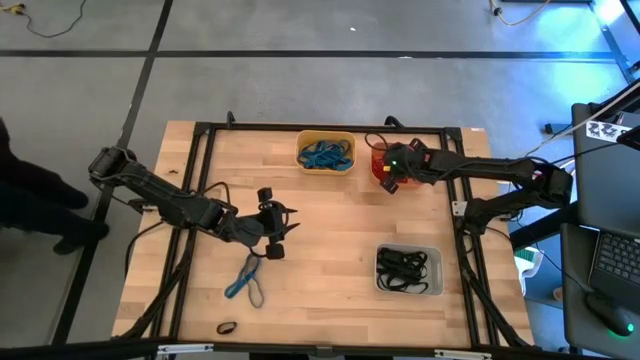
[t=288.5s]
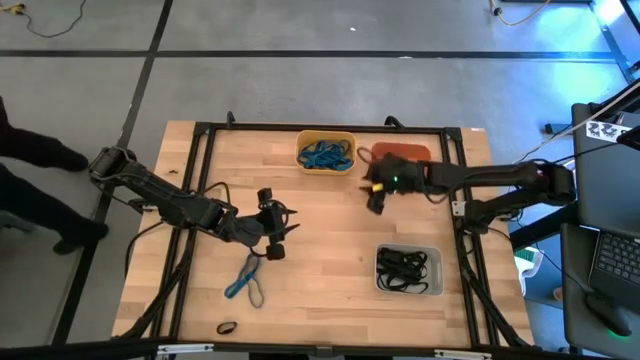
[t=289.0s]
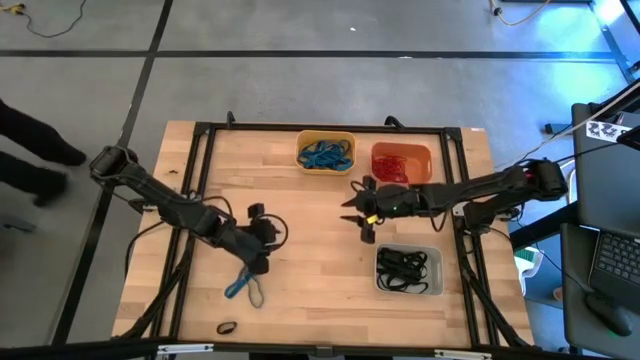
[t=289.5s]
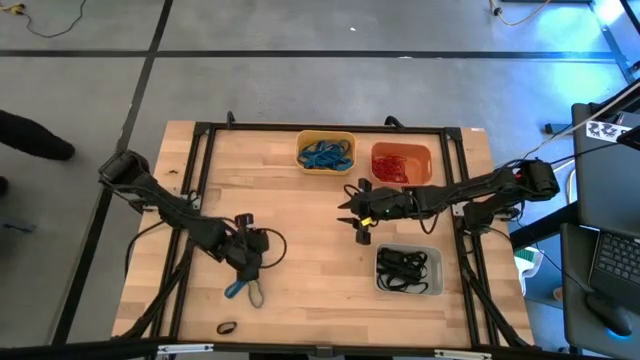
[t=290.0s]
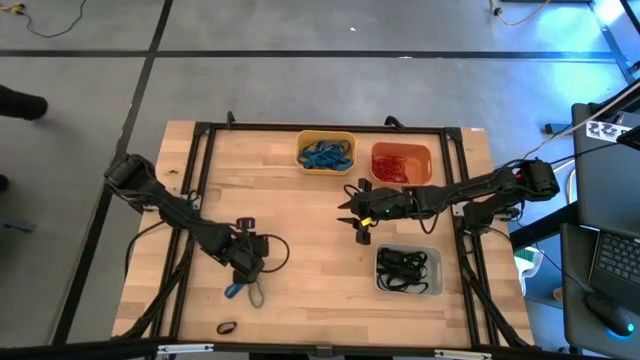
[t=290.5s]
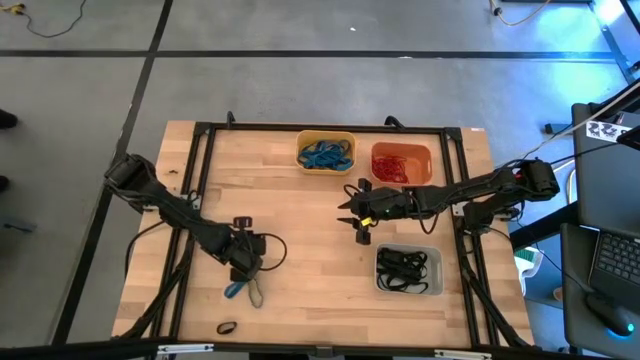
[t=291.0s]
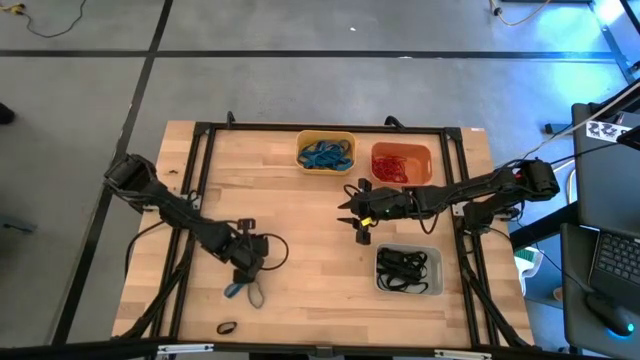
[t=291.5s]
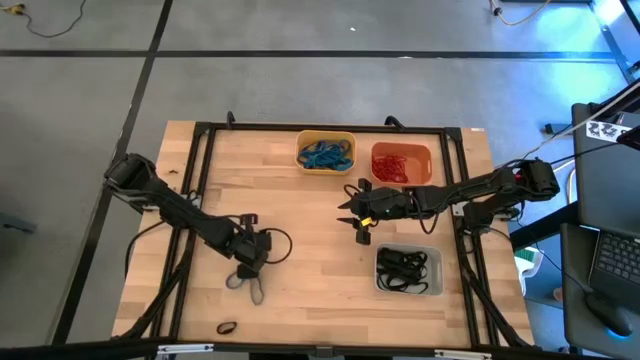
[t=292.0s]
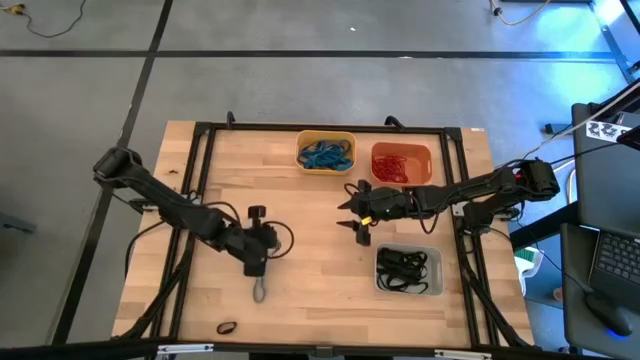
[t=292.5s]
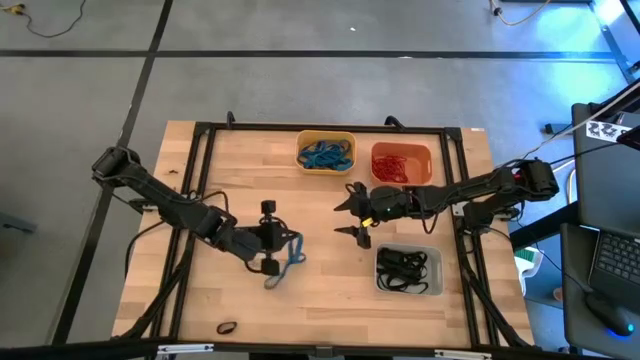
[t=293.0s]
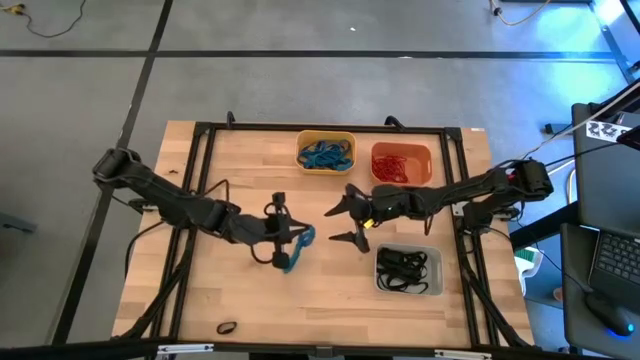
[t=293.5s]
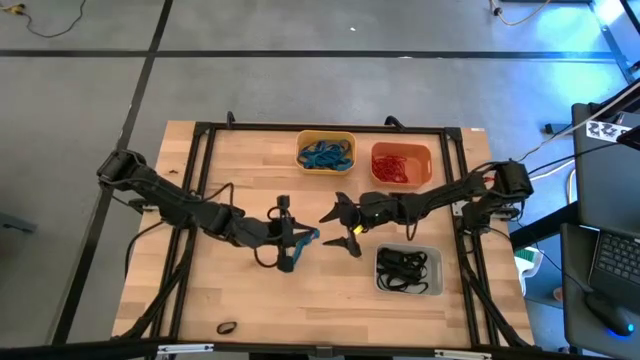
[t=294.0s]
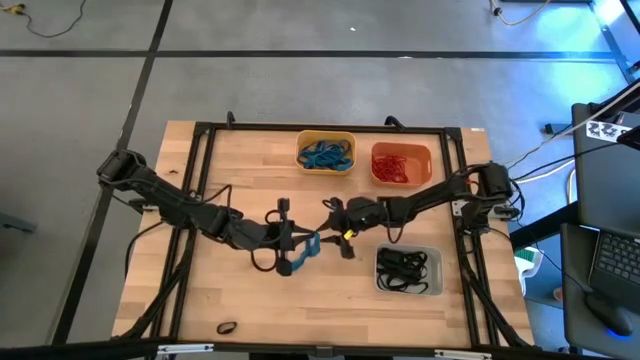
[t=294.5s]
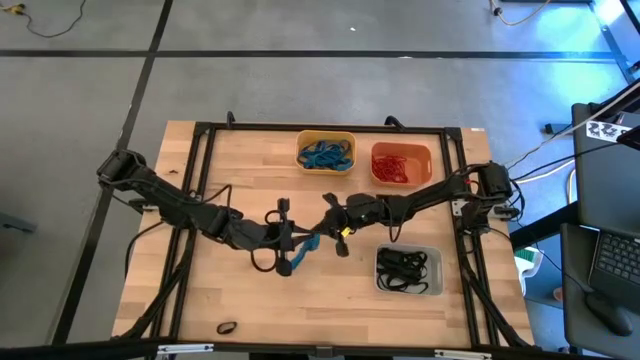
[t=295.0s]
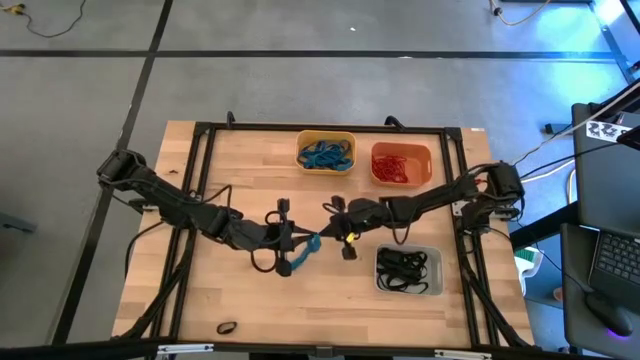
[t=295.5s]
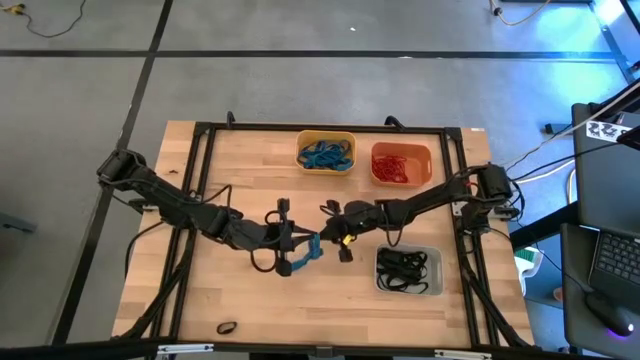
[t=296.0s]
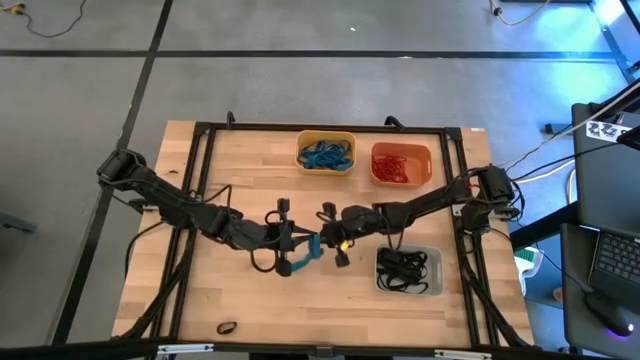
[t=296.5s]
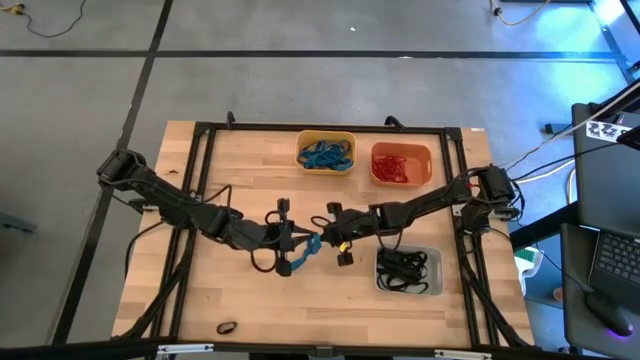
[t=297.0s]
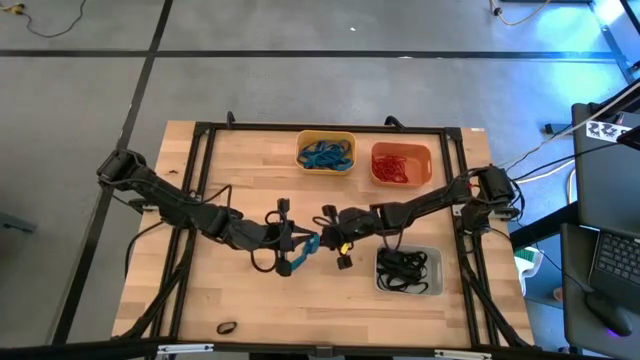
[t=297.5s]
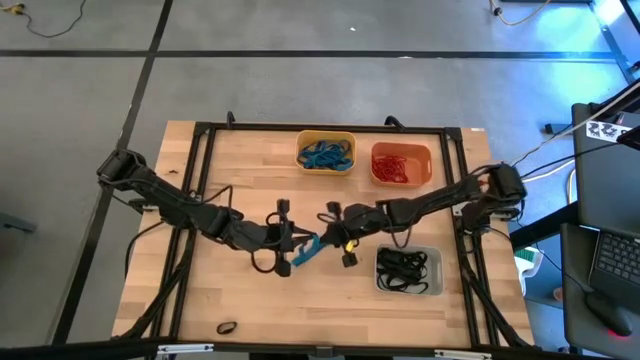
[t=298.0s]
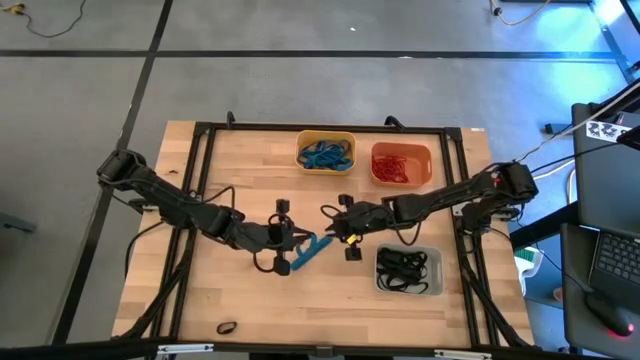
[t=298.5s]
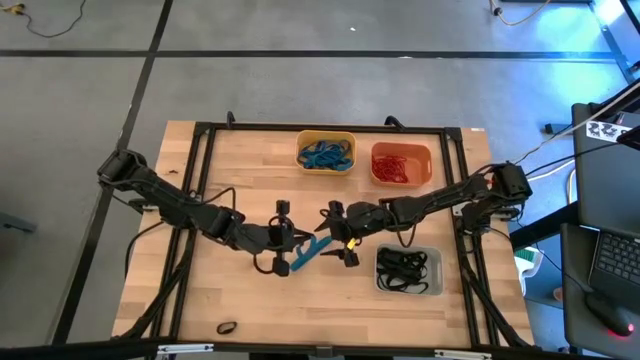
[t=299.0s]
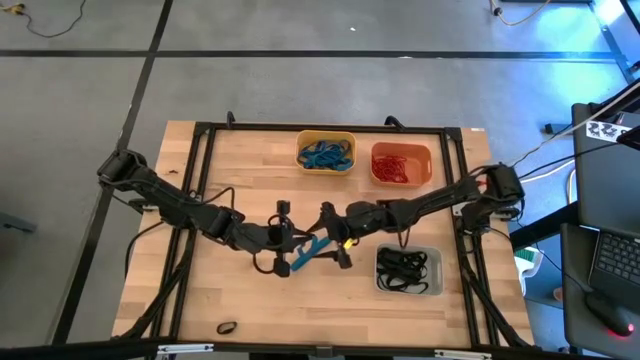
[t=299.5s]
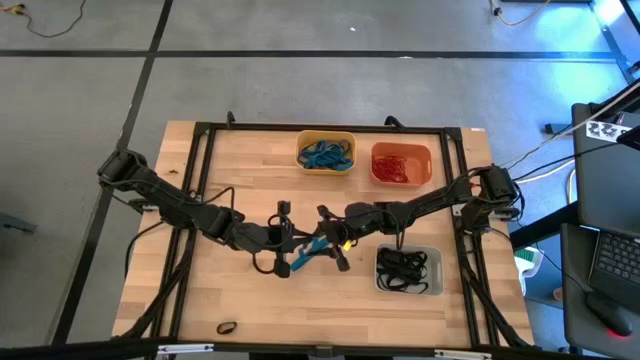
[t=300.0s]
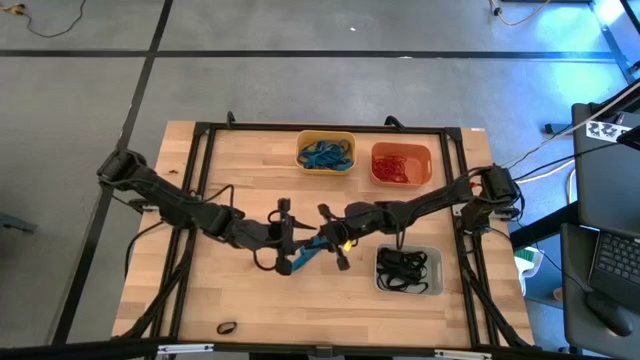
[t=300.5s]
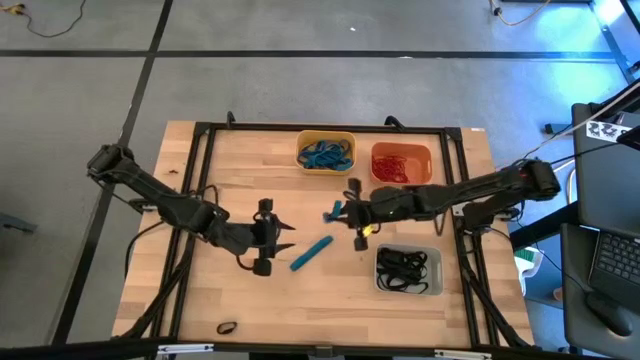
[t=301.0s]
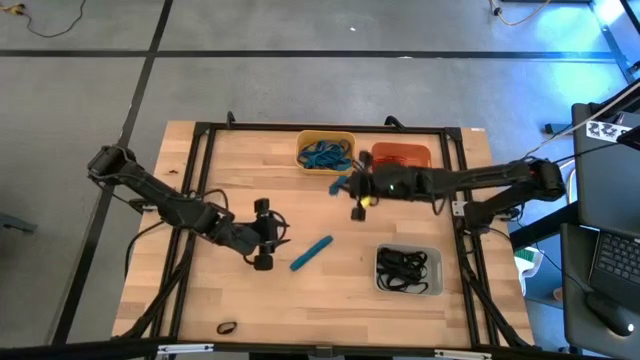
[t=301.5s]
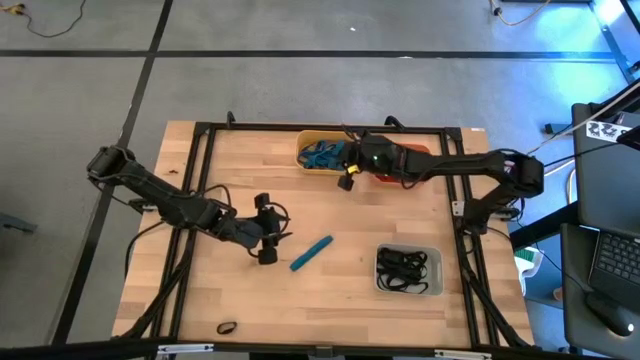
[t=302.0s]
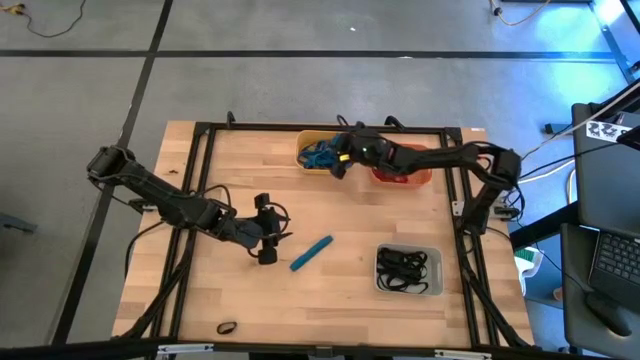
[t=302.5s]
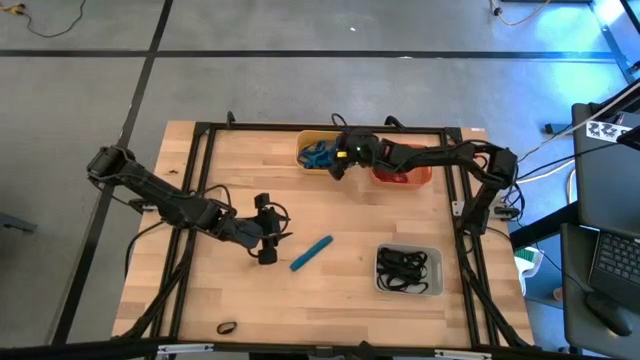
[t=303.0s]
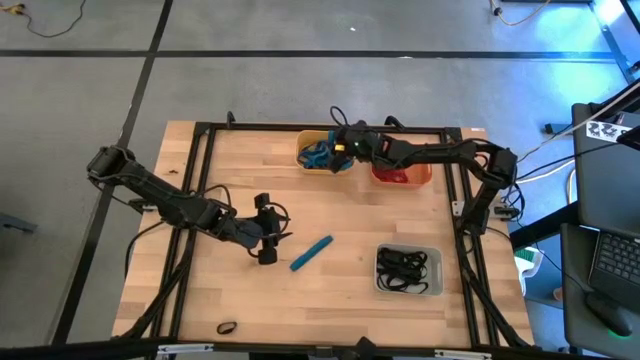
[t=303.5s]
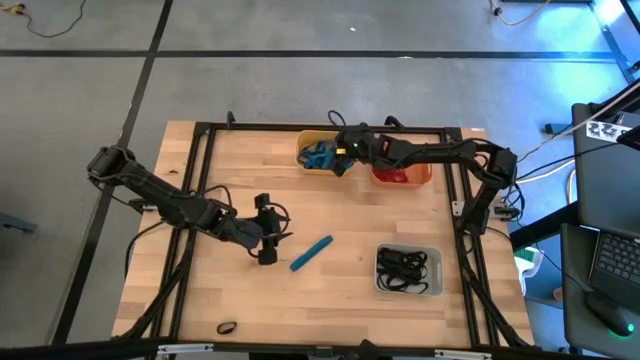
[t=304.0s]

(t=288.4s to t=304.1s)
Task: Sort rubber bands into baskets
Put the blue rubber band into the yellow bin

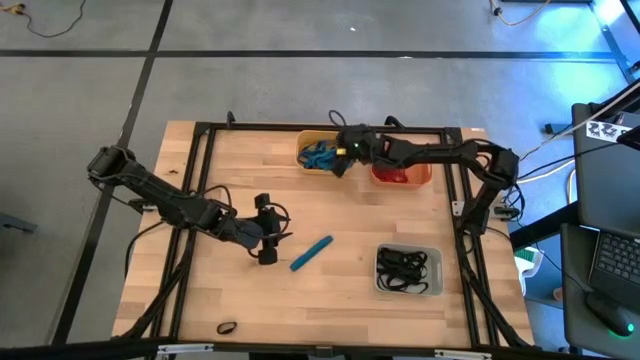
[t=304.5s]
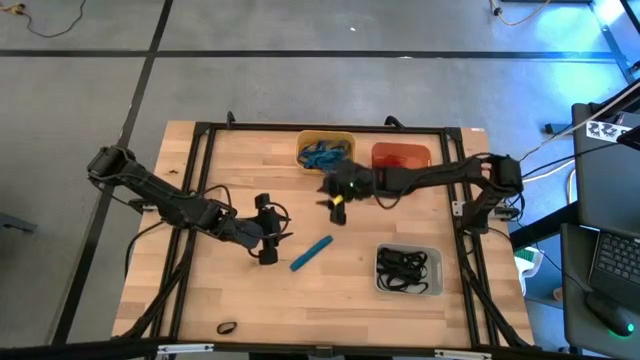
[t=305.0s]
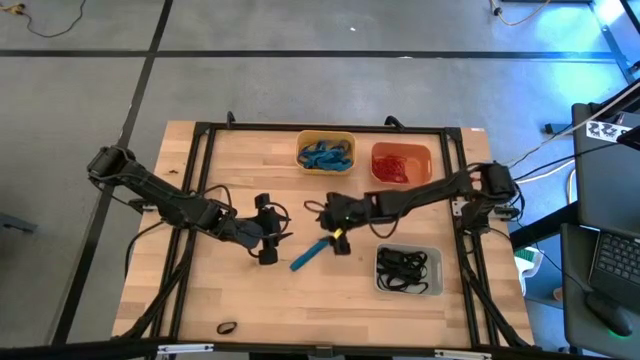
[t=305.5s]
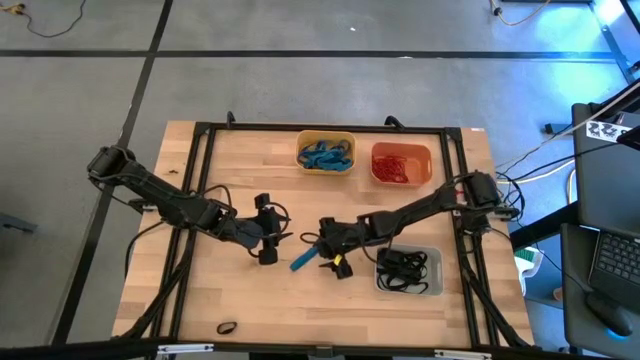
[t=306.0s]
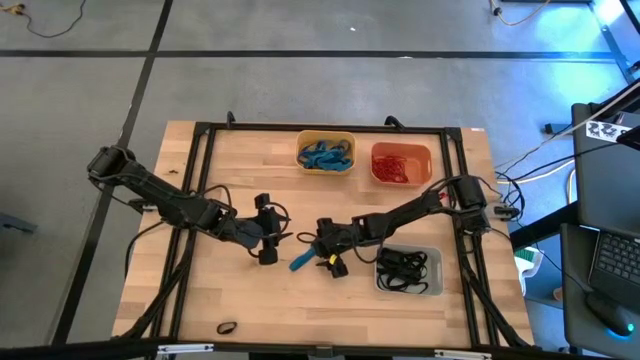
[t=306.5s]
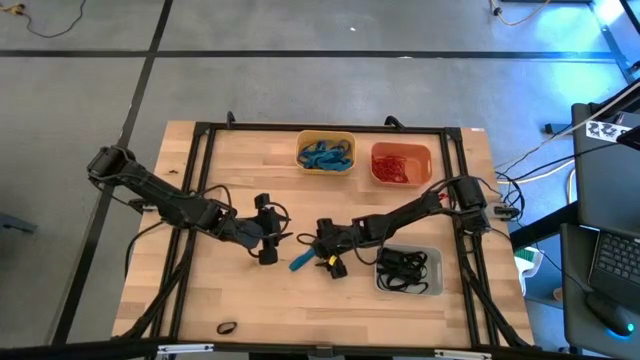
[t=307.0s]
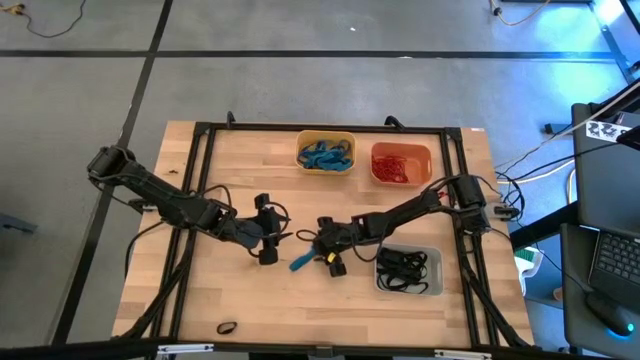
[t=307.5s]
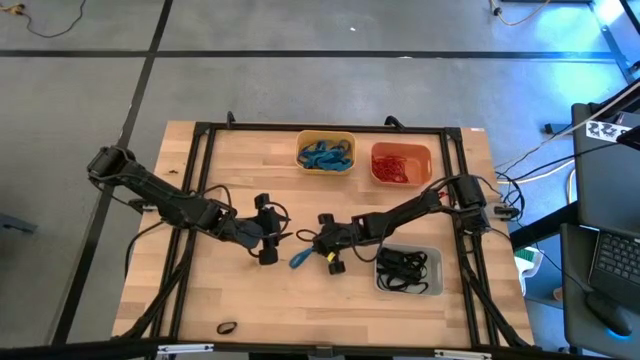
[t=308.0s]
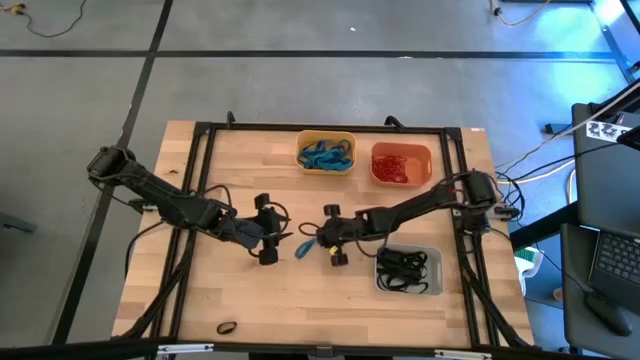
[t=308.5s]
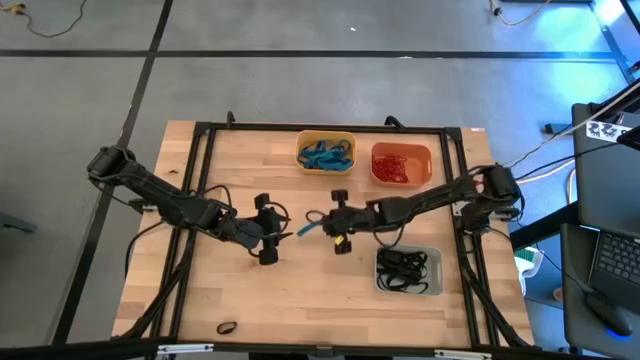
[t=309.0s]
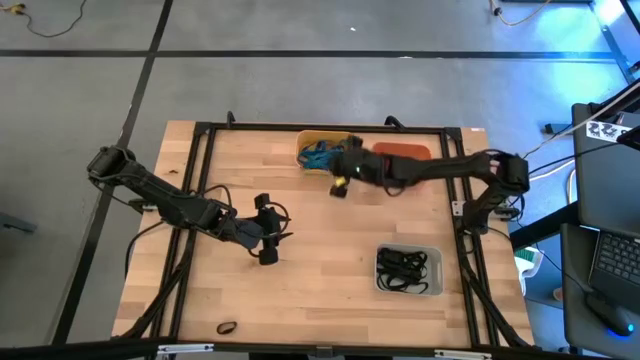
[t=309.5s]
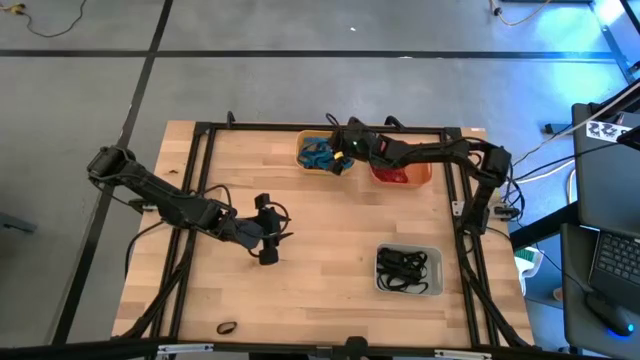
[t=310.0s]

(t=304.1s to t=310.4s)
Put the blue rubber band into the yellow bin
